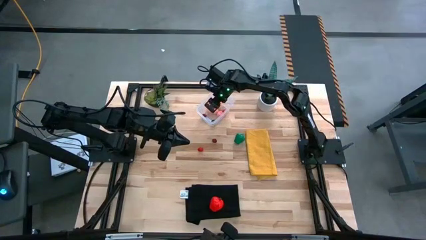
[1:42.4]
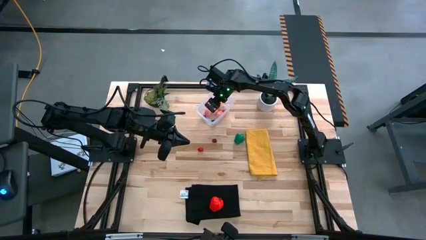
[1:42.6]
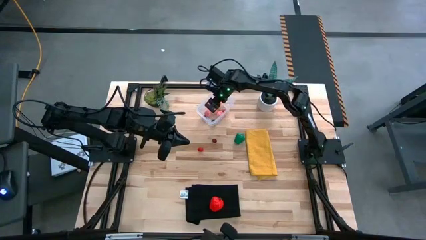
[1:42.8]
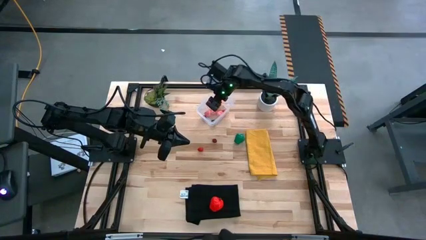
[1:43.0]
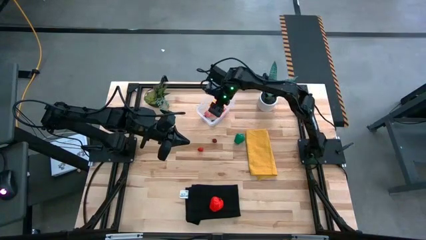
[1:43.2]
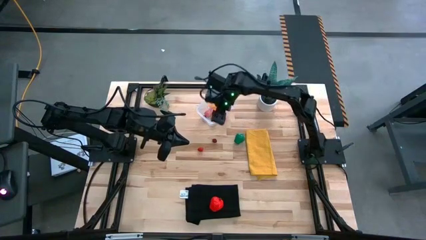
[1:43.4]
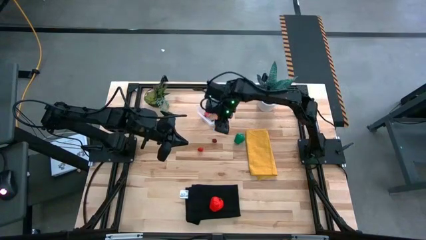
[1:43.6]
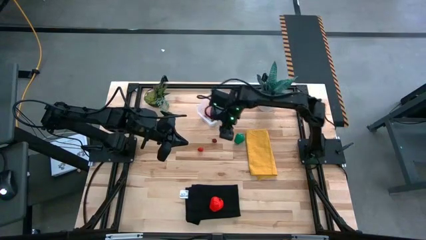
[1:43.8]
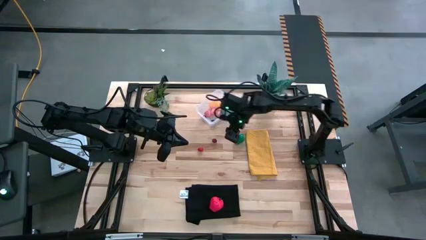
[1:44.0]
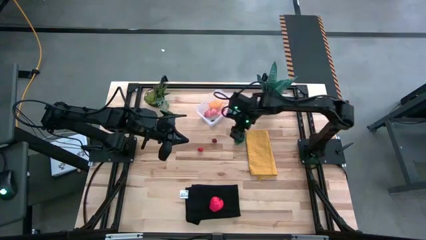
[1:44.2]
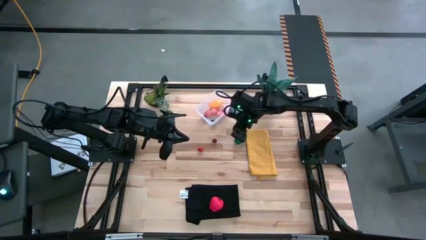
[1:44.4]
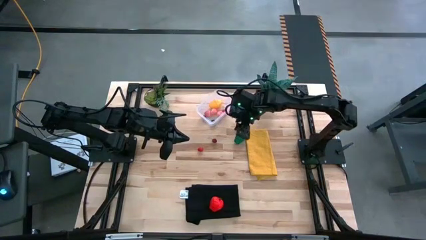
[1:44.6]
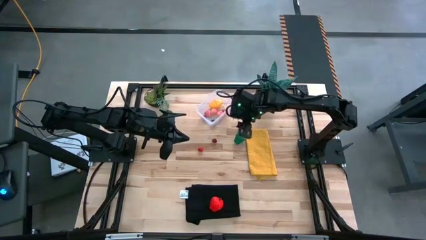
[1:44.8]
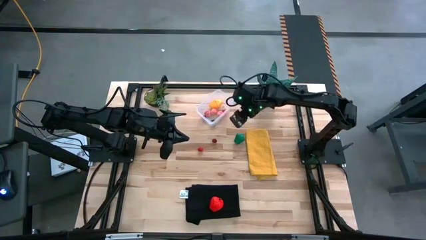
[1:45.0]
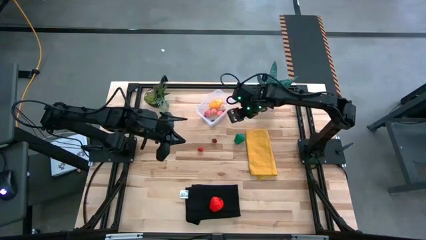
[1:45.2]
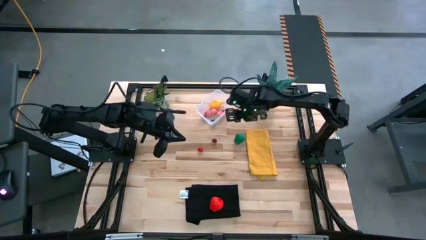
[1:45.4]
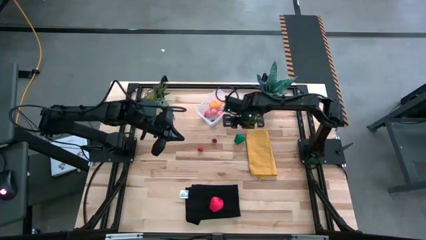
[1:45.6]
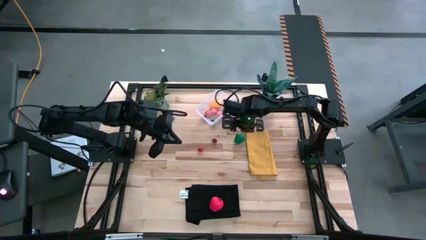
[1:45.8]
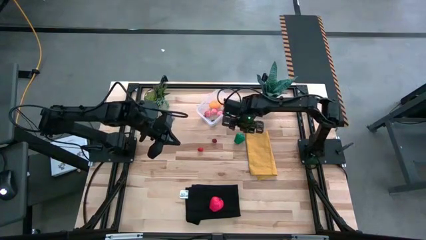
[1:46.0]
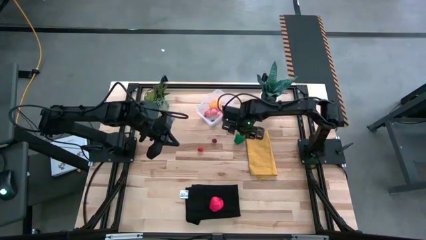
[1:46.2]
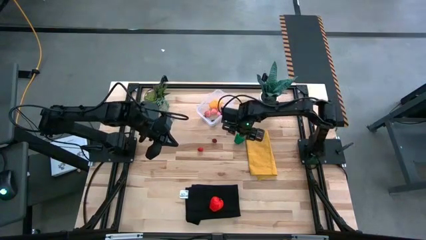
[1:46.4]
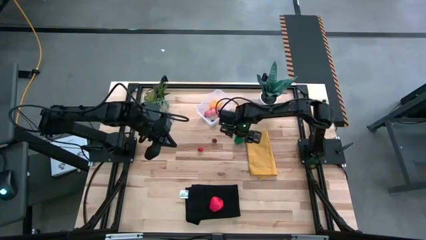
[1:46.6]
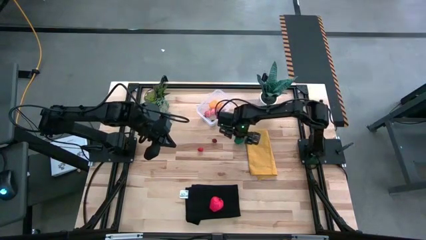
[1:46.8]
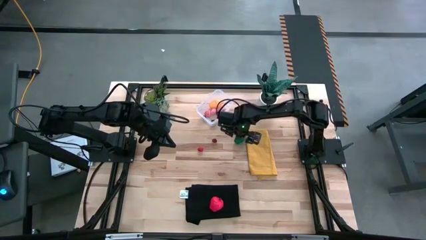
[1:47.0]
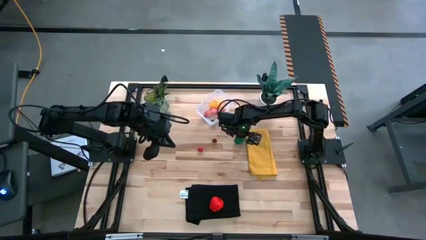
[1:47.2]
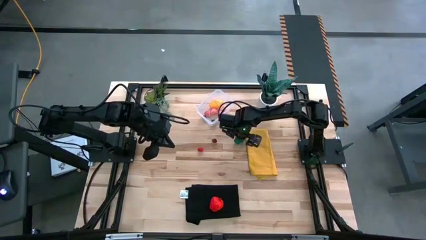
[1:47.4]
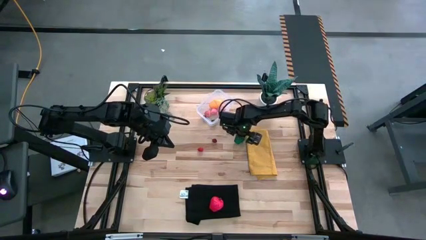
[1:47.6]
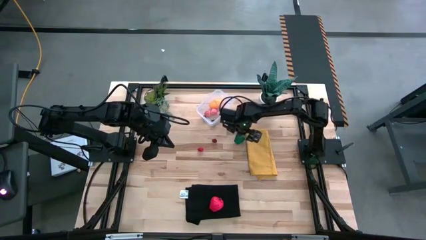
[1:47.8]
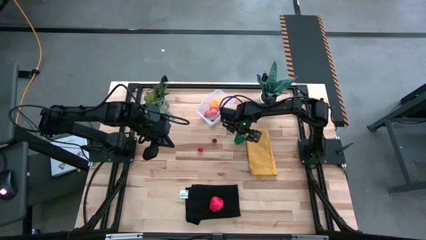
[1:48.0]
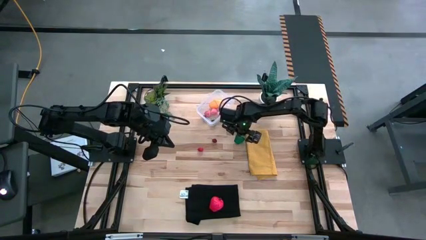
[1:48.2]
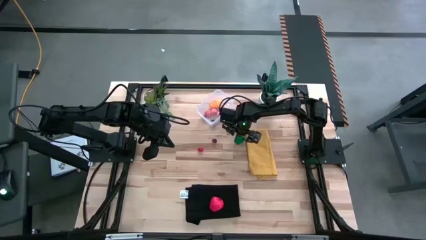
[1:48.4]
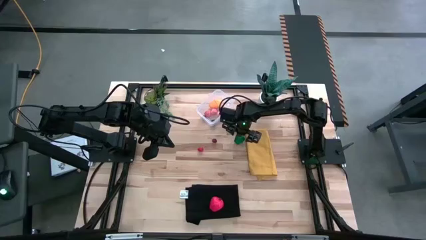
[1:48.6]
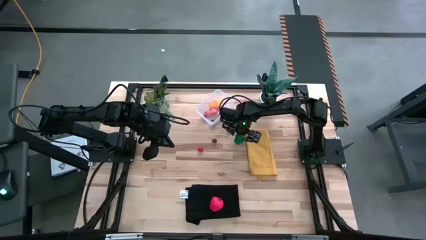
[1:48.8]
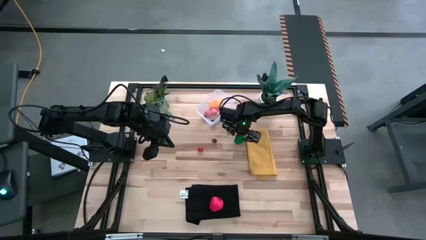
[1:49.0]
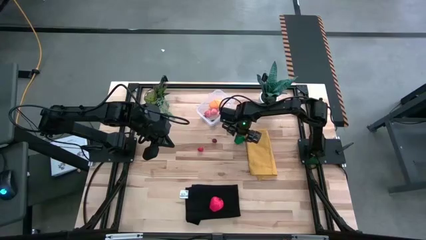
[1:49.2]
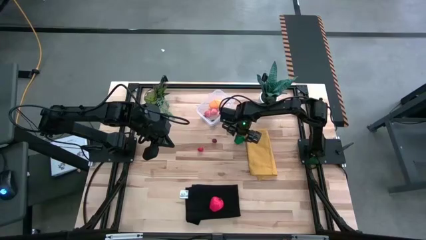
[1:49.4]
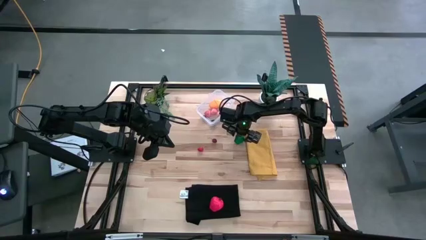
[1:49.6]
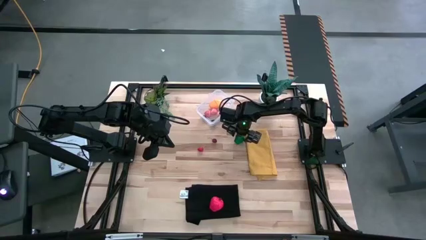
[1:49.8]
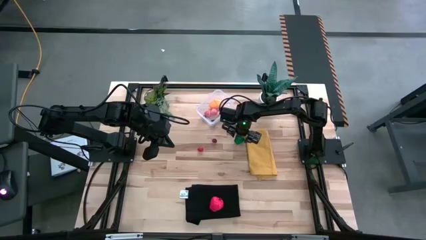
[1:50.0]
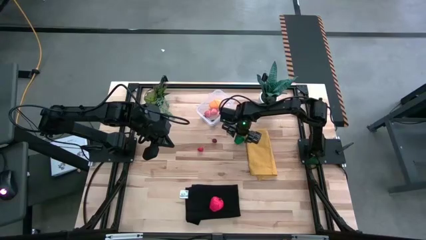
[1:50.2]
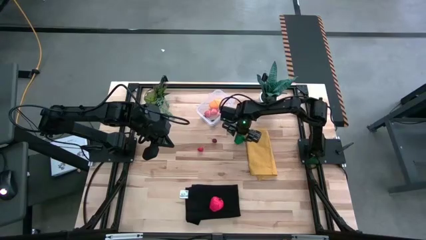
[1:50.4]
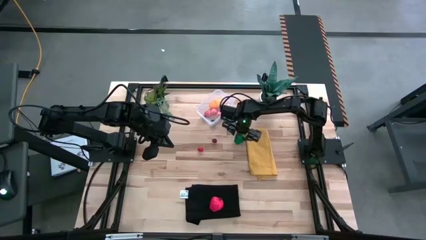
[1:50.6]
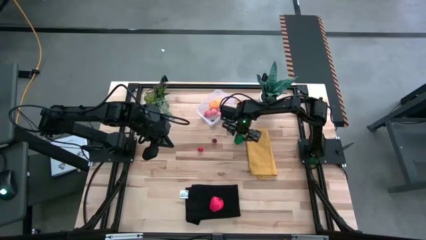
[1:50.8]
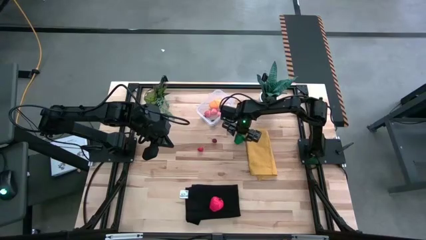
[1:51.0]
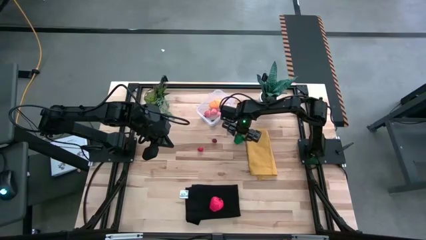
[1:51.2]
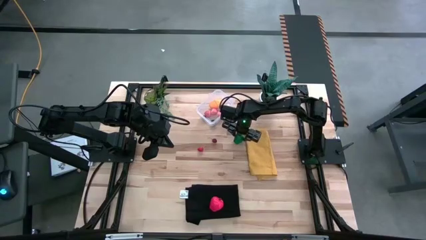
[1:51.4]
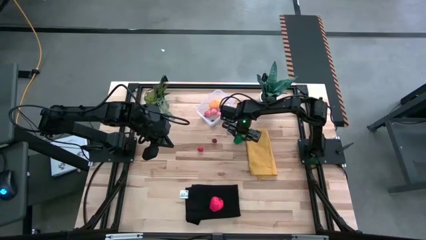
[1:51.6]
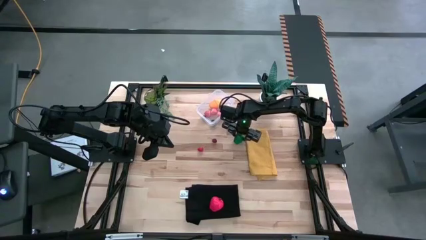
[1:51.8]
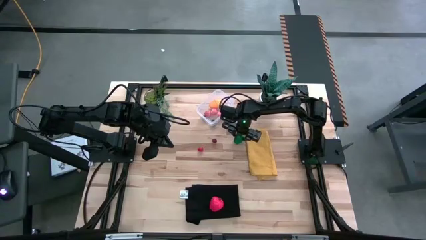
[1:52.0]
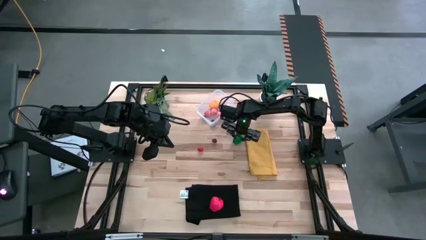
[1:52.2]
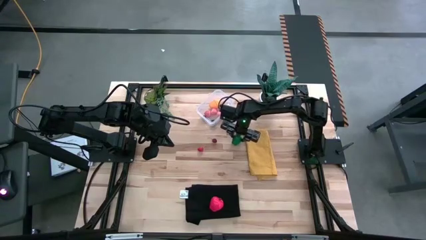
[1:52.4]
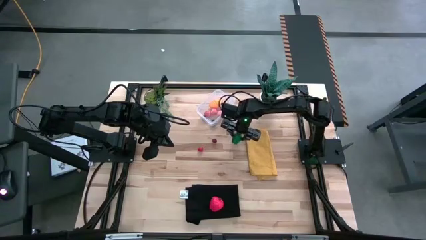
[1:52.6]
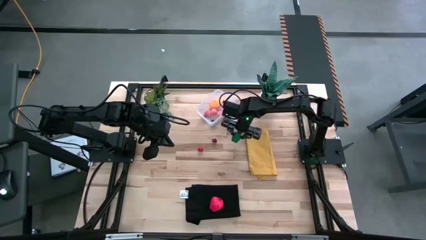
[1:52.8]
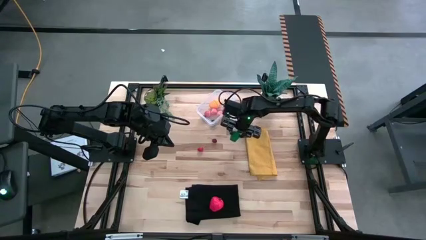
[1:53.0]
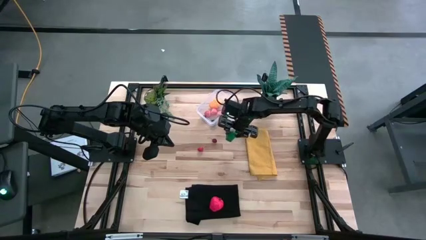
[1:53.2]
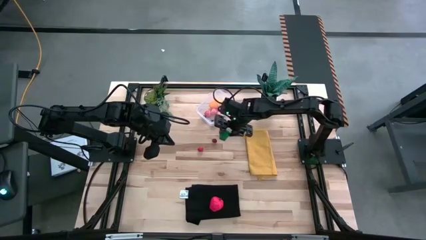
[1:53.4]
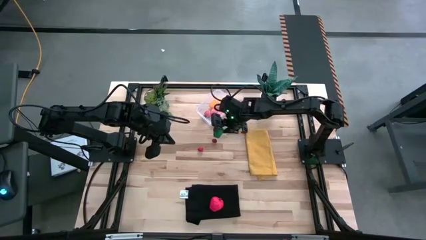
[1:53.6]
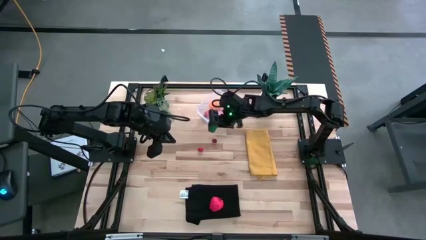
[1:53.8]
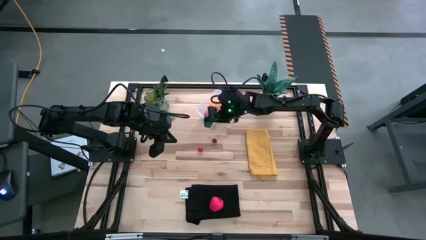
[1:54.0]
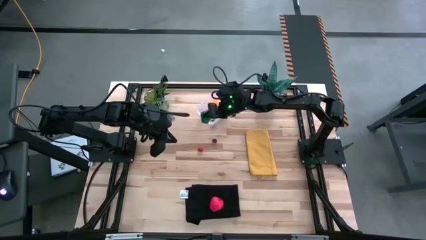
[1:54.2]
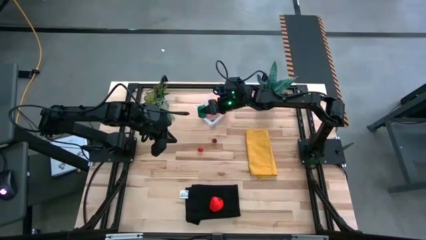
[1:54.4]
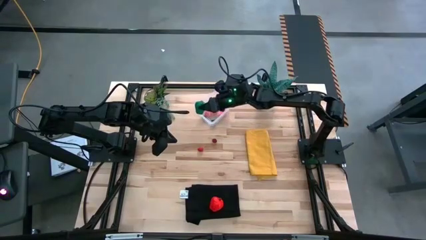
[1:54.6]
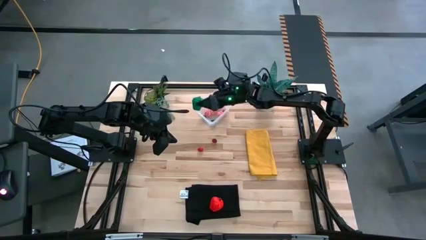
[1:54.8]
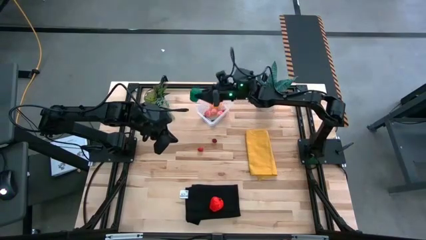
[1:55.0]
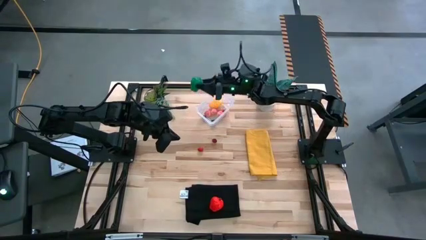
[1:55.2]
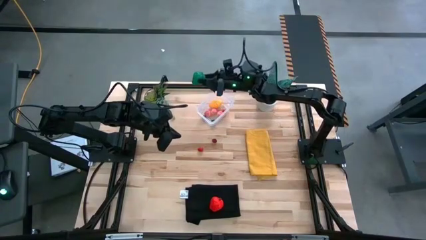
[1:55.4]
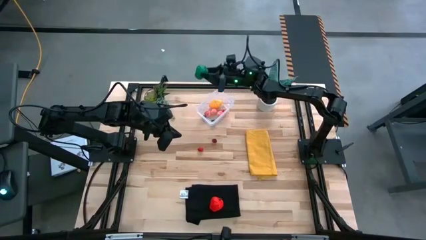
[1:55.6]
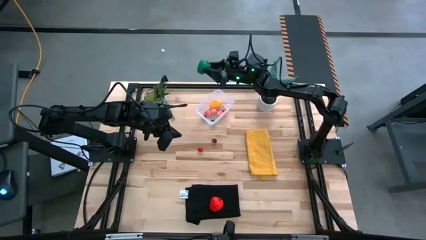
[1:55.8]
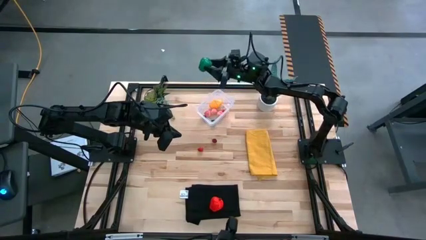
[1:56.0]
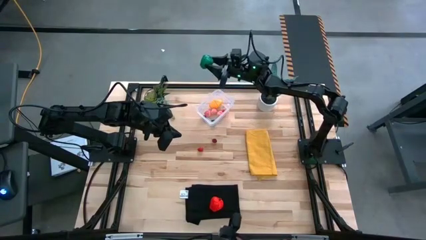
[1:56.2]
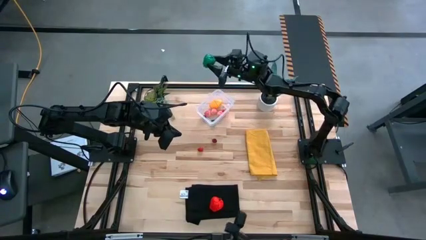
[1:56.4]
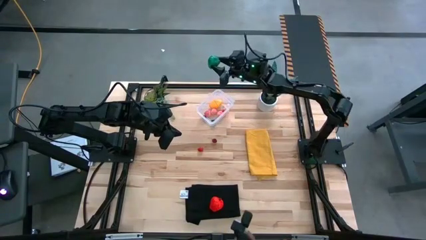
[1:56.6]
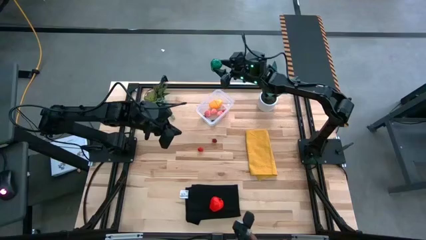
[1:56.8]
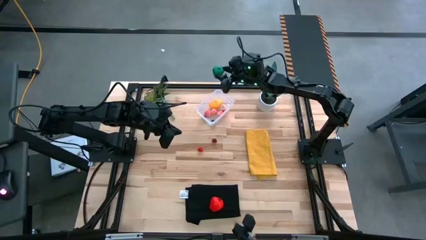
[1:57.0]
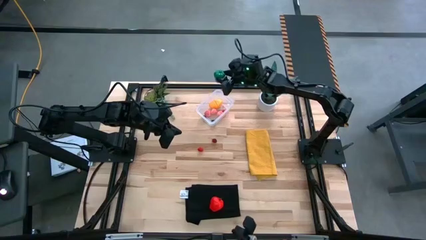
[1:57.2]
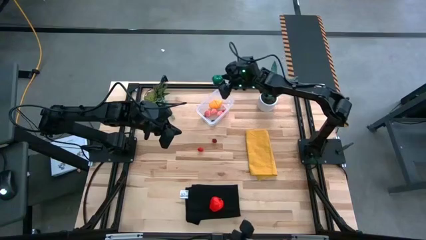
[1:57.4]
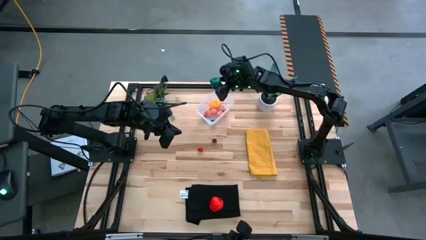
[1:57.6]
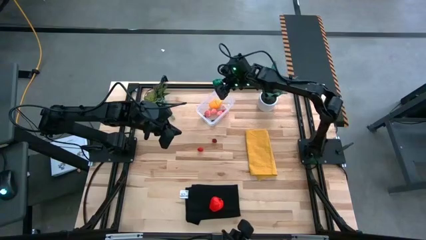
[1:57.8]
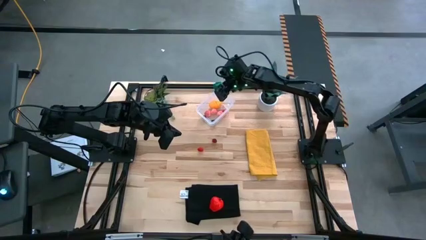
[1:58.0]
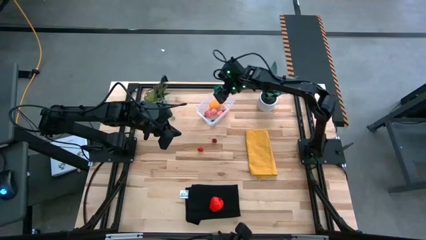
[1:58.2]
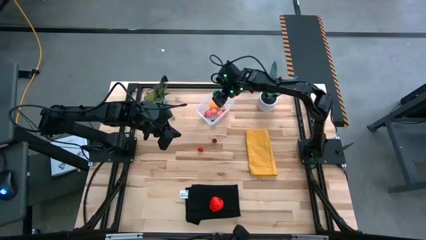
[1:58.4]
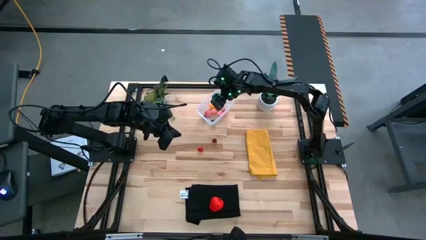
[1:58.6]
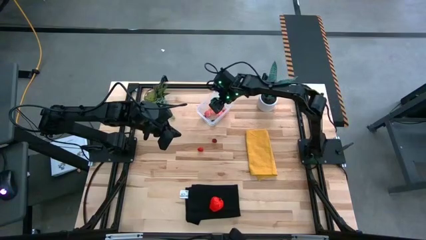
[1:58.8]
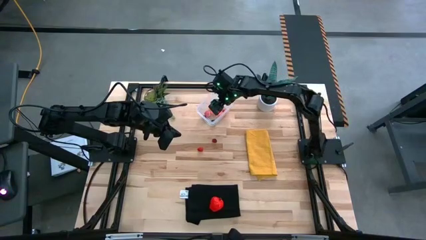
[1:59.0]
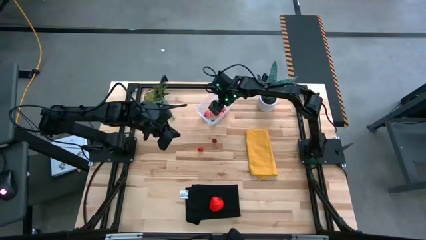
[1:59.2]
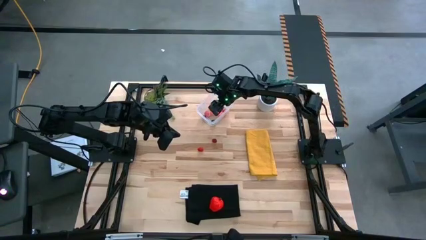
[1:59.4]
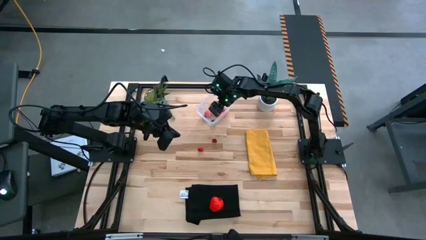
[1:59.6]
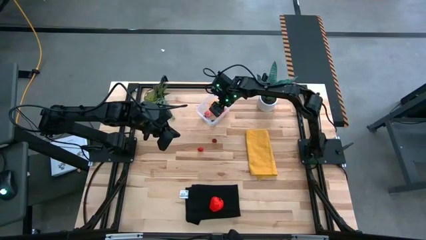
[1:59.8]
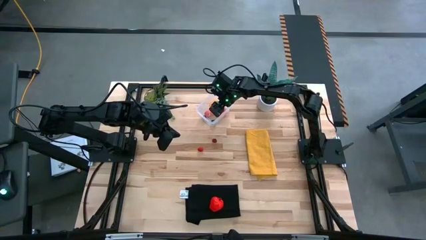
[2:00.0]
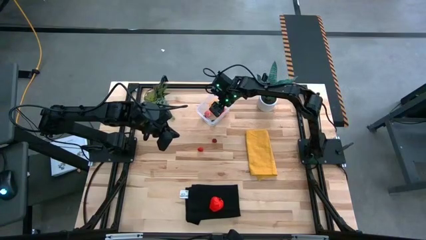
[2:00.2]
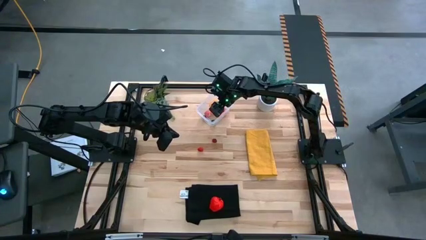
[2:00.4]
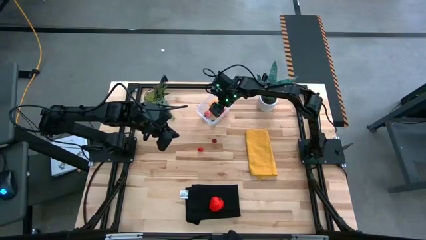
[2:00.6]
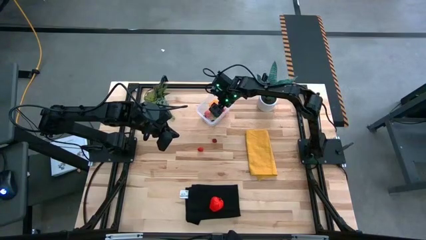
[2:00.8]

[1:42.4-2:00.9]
Task: Pick and placing Produce into tupperware
Put the green bell pepper into the transparent bin
